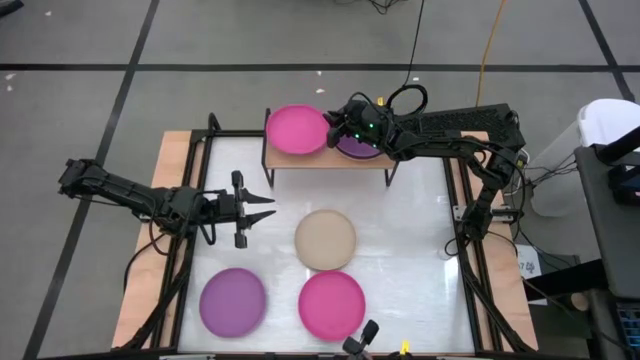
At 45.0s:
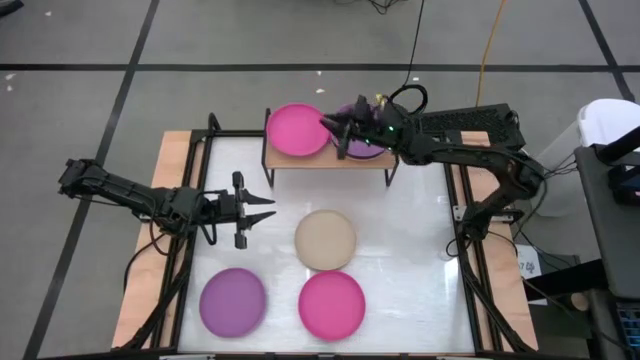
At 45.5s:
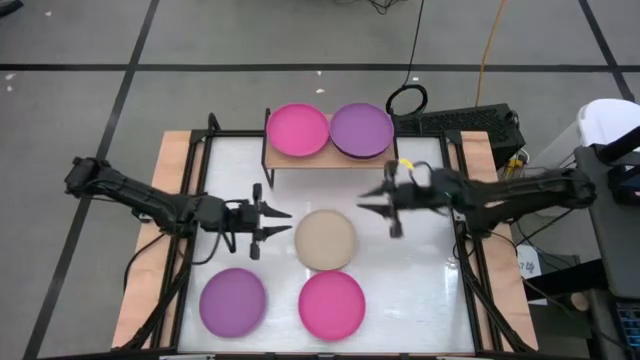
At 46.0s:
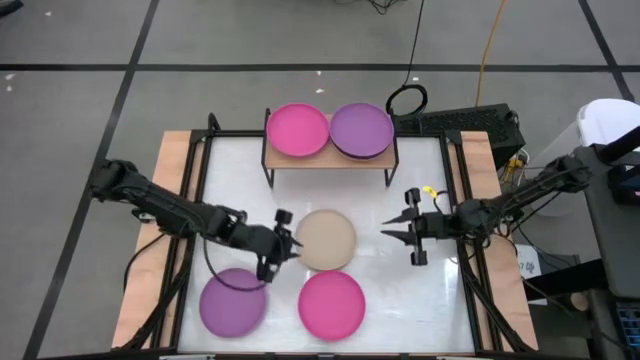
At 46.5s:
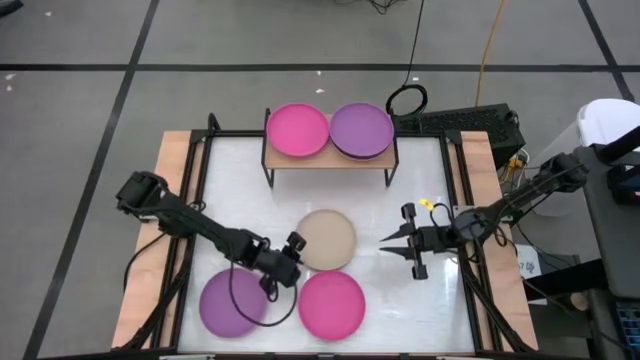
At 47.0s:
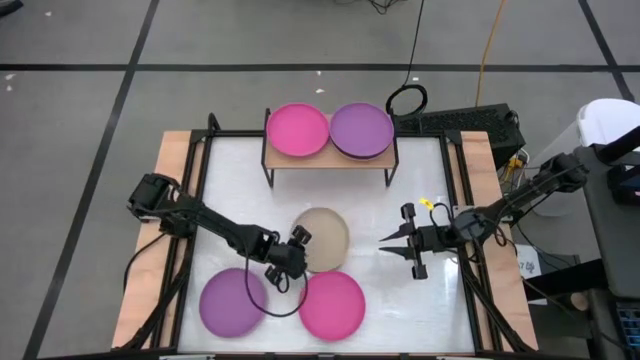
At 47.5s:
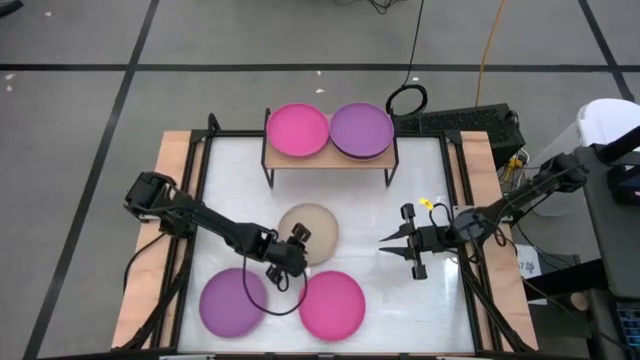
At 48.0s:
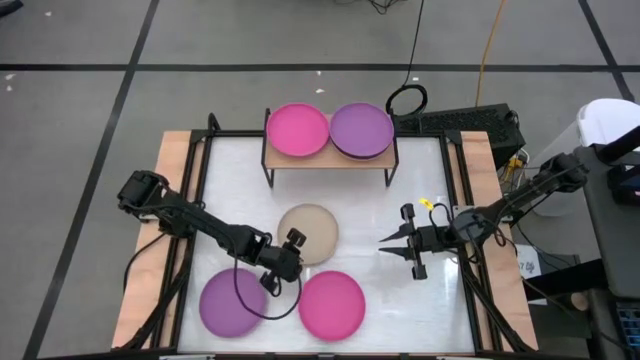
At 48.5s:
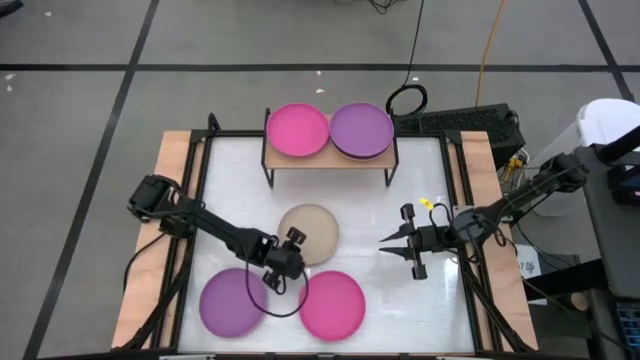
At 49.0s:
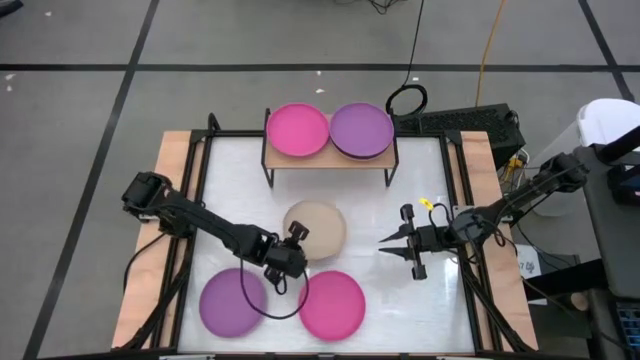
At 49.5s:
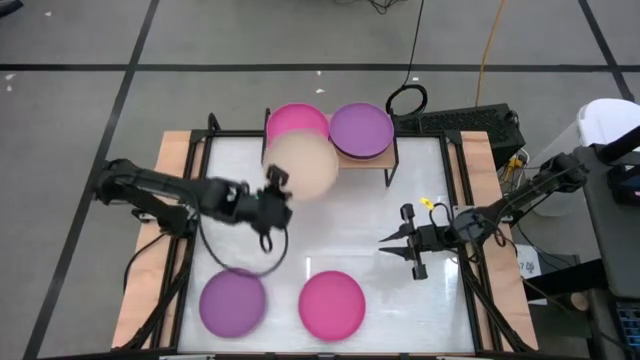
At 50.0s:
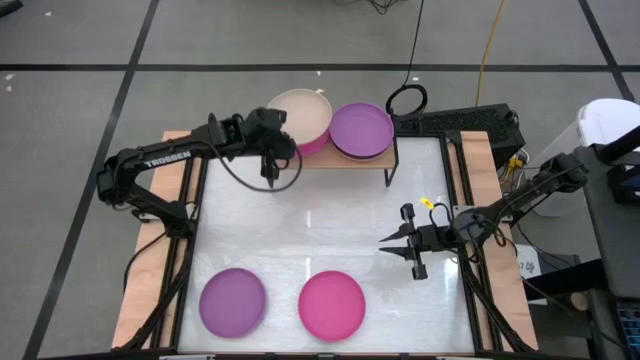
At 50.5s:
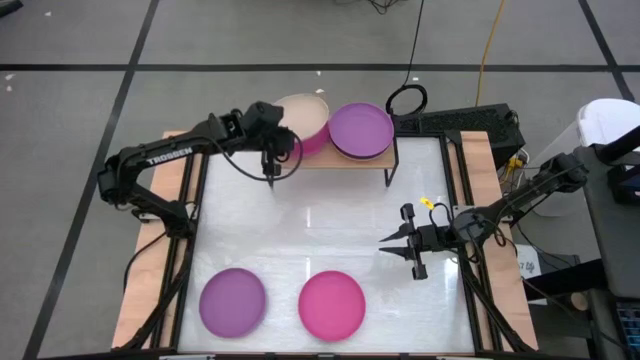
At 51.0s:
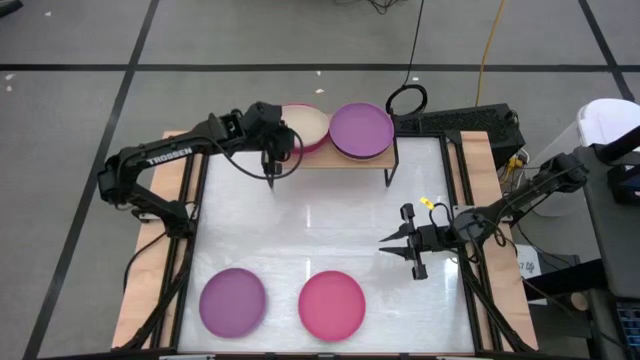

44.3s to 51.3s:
Task: Place and stack plates onto a shelf
Stack the light brown plate on top of the pink plate on the shelf

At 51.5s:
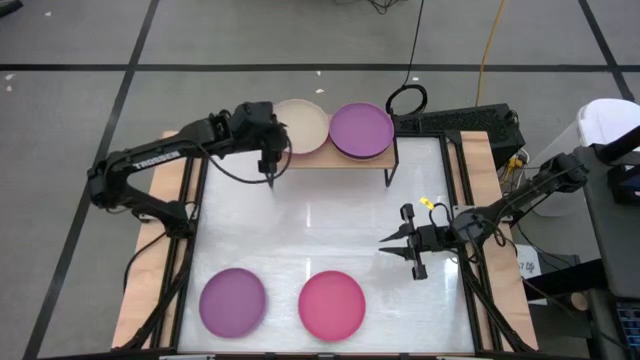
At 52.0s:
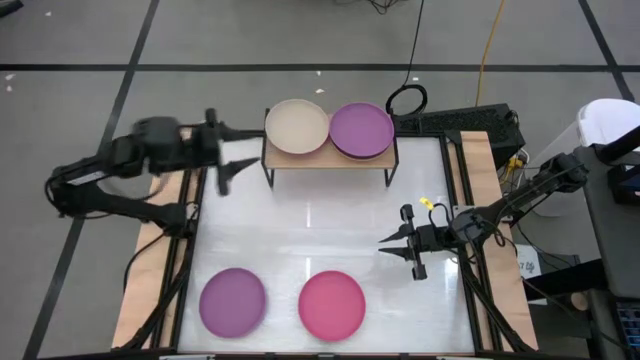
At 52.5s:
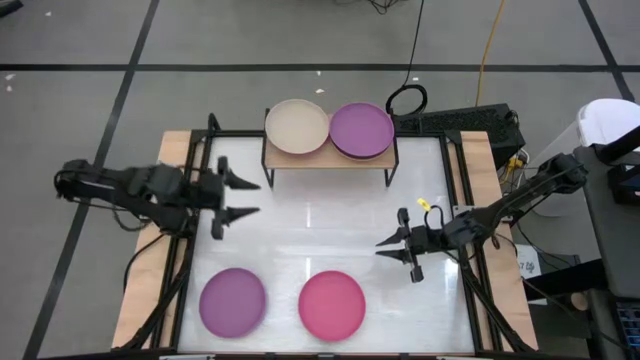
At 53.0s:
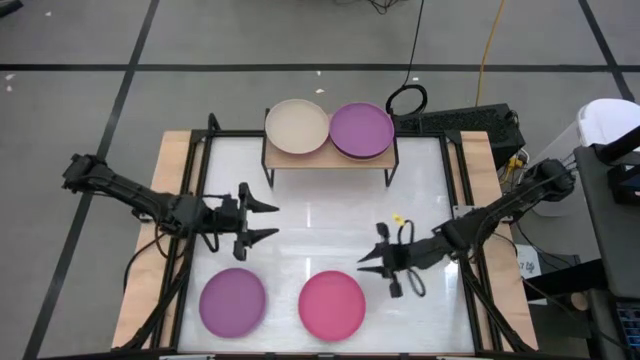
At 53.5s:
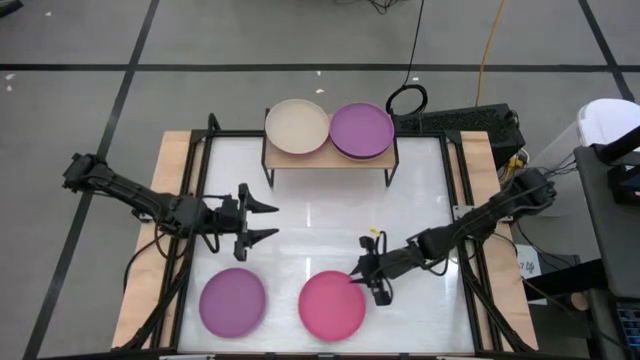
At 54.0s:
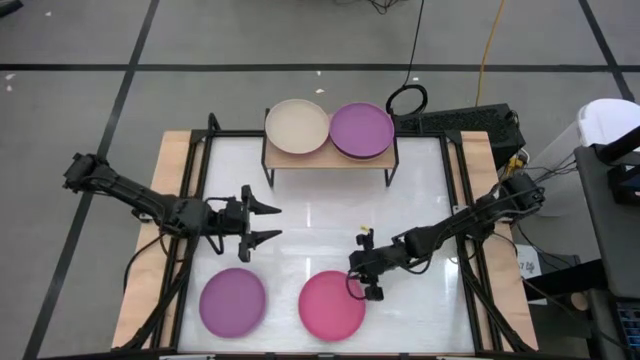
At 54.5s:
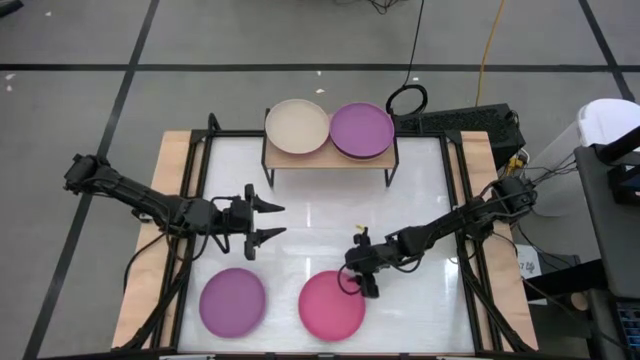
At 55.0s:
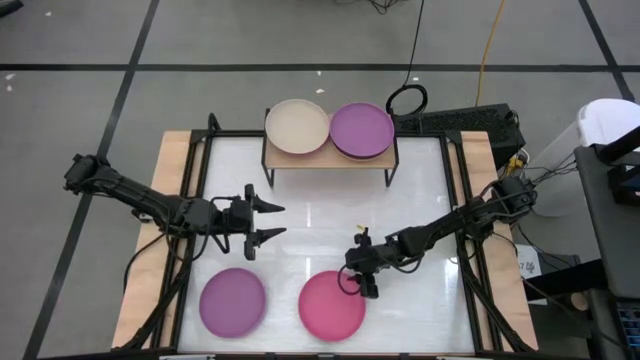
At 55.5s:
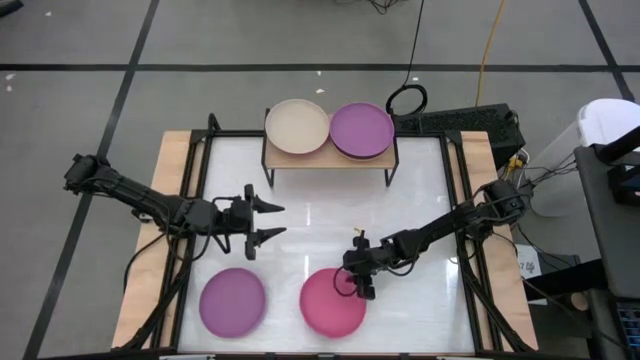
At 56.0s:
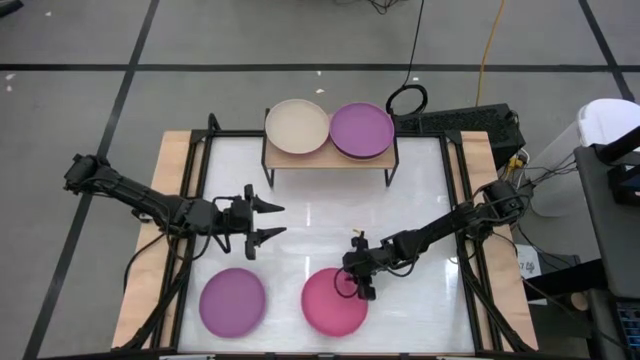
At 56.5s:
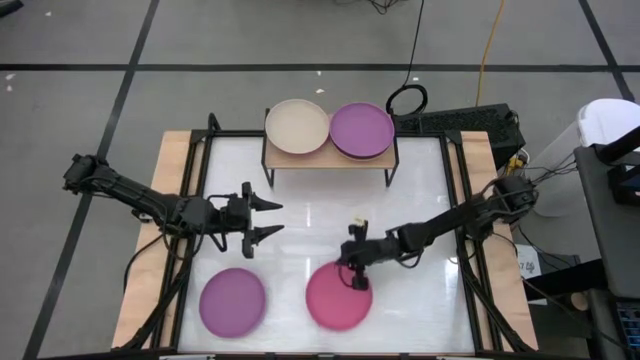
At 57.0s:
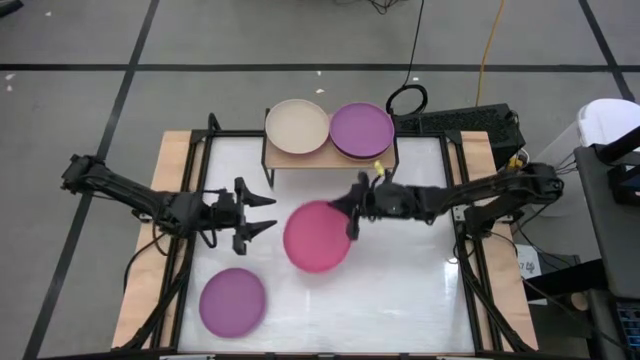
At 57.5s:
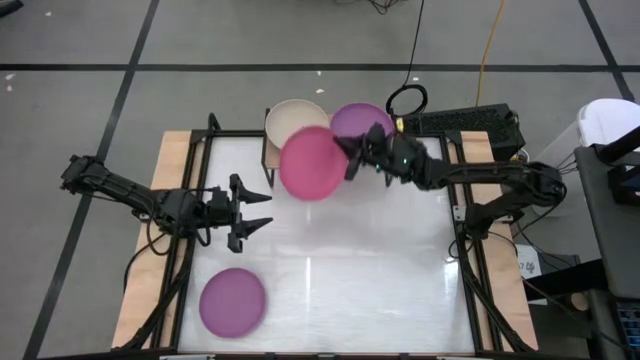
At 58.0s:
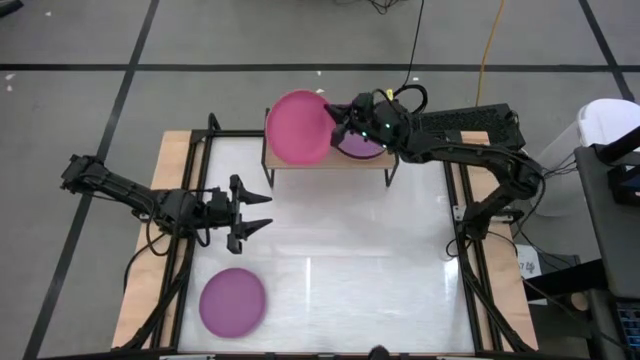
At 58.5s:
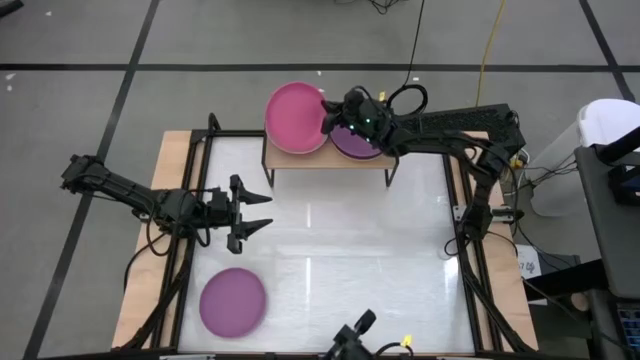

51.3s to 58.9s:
Stack the pink plate on top of the light brown plate on the shelf

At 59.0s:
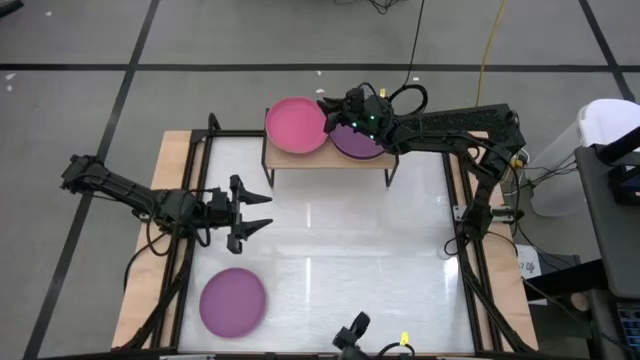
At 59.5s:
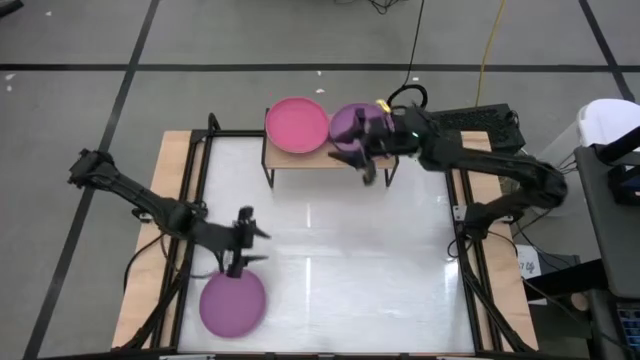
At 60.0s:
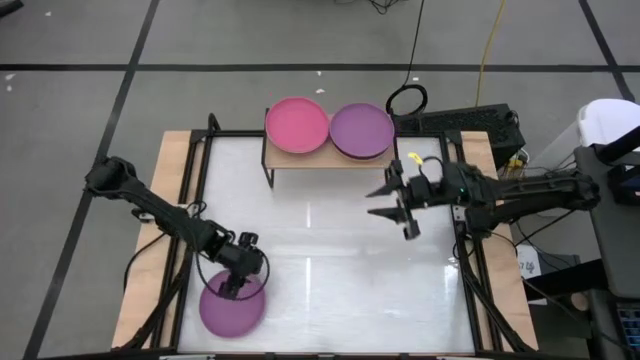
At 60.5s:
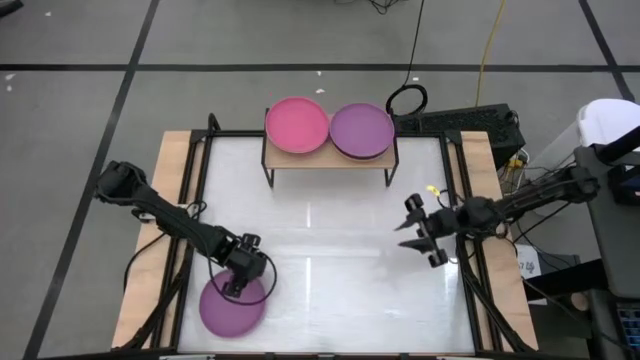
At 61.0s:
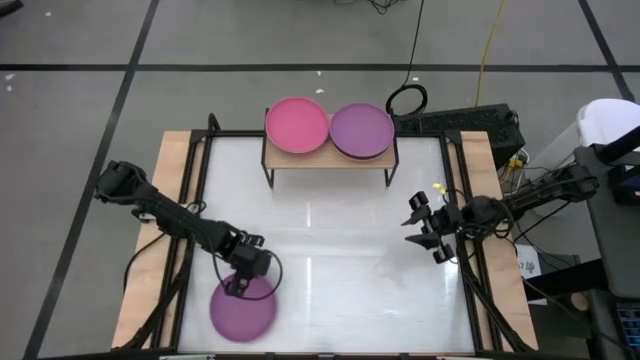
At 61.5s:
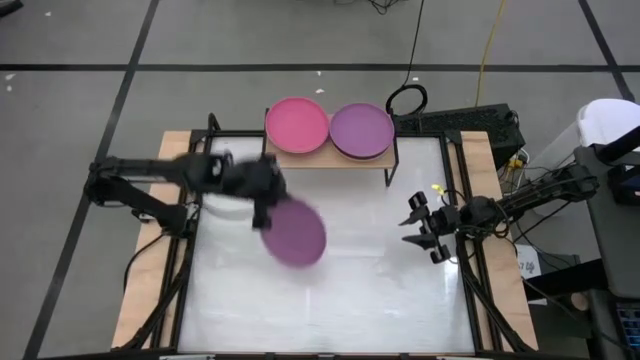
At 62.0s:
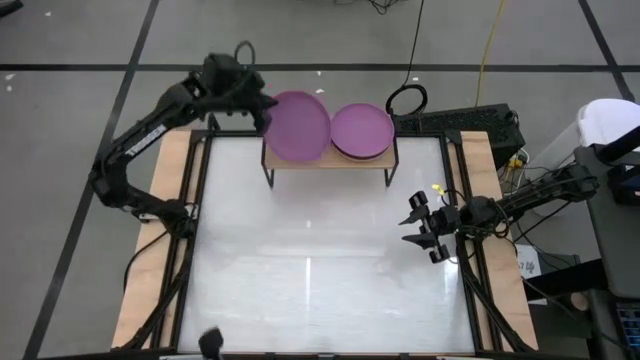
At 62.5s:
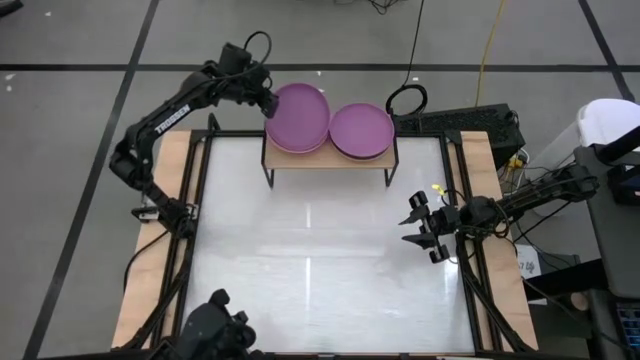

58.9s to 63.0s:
Stack the violet plate on top of the pink plate on the shelf

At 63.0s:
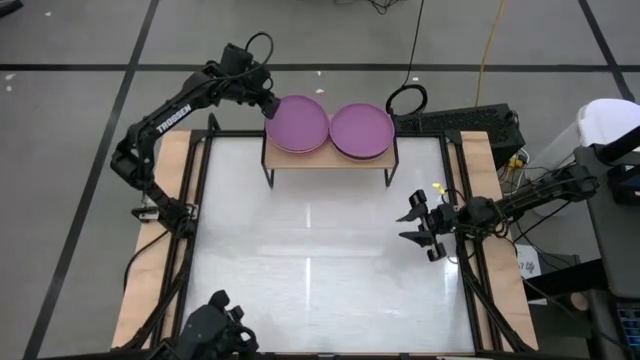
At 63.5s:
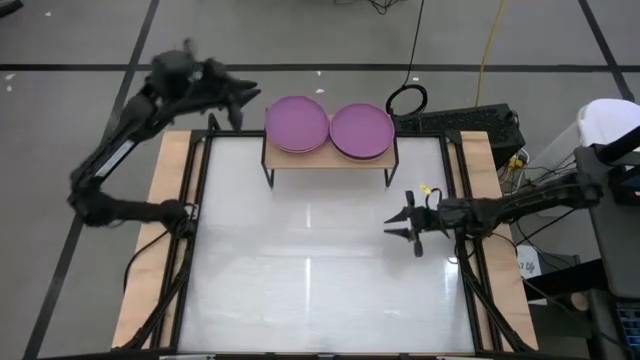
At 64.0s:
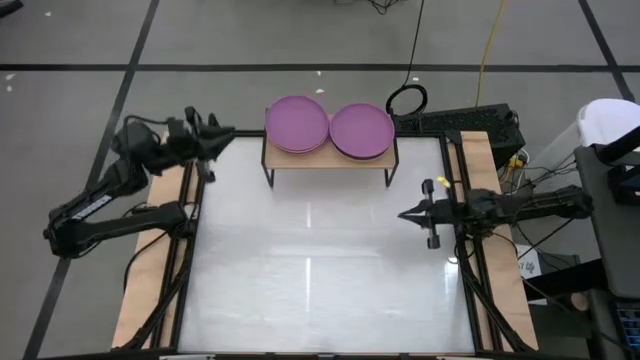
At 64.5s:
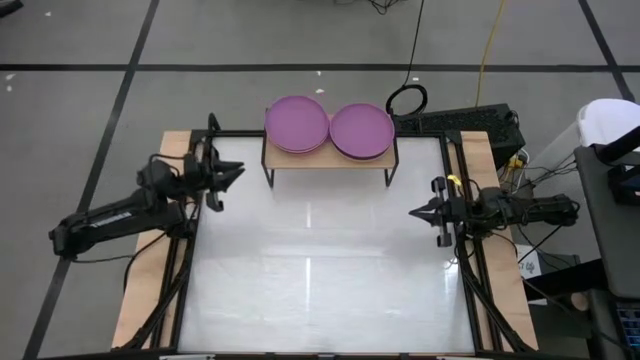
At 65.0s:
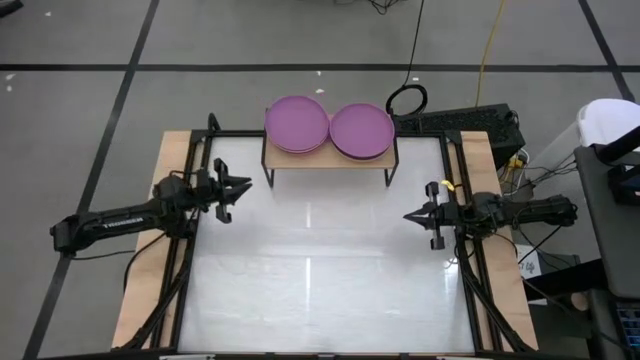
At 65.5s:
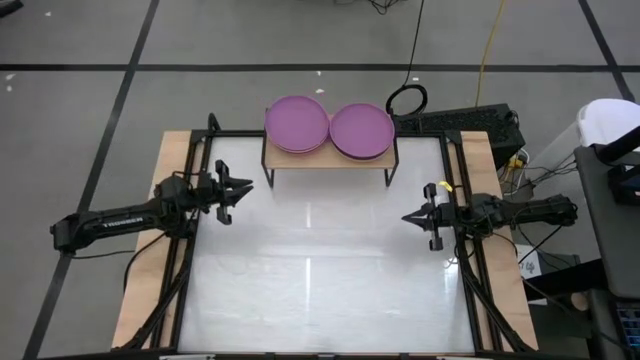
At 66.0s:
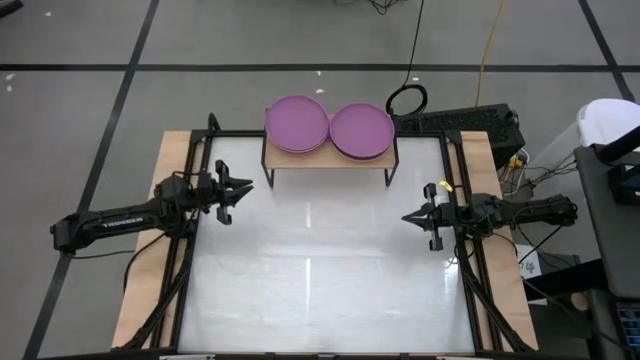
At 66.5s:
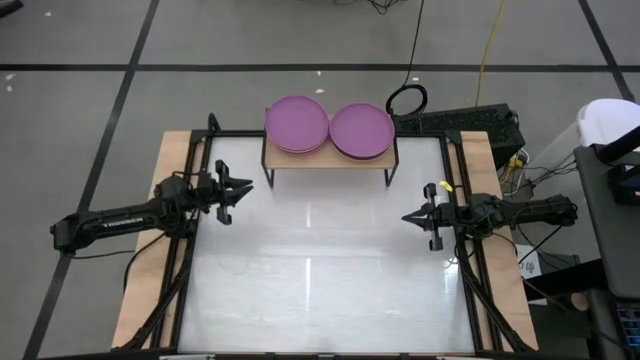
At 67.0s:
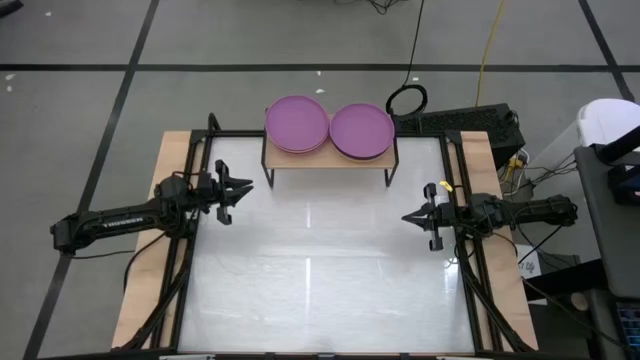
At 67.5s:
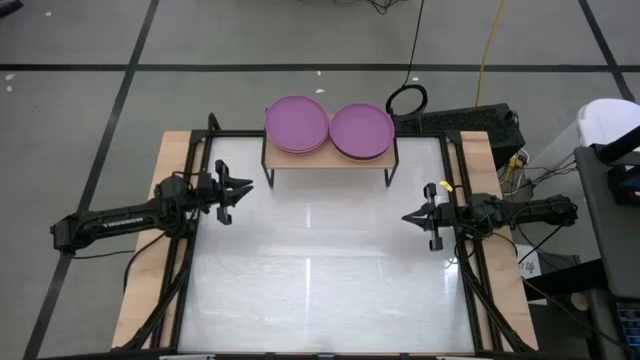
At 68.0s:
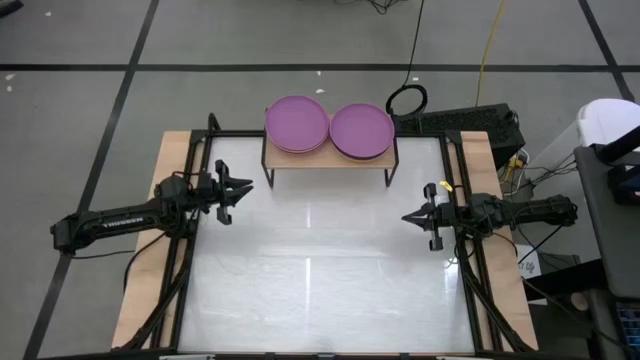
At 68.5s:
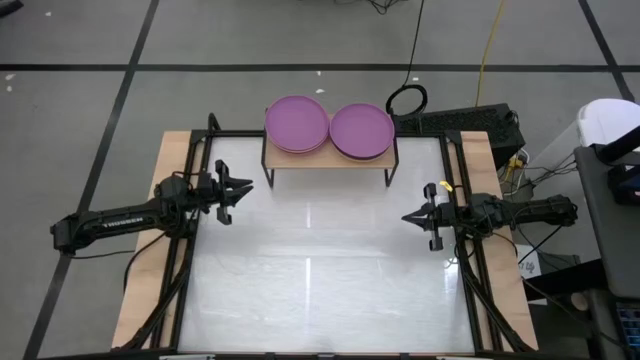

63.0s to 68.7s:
Return to Home Position
